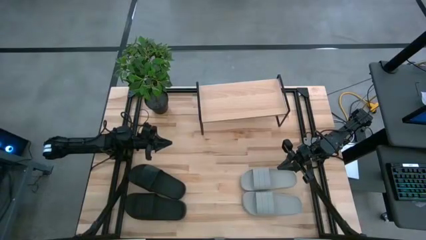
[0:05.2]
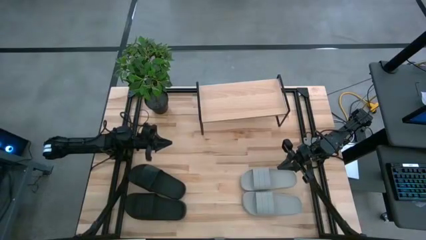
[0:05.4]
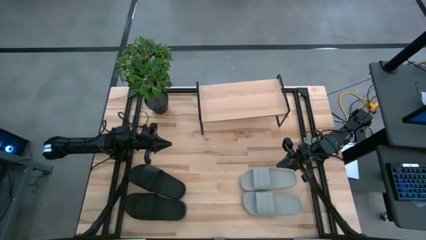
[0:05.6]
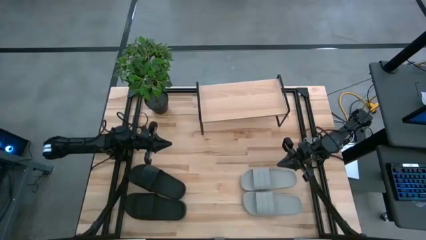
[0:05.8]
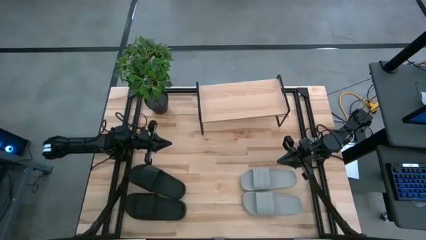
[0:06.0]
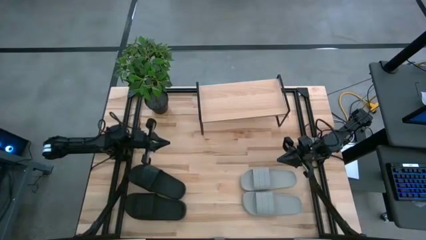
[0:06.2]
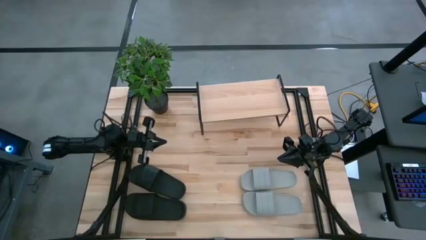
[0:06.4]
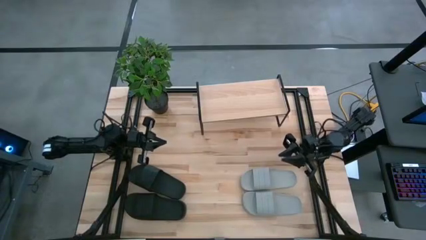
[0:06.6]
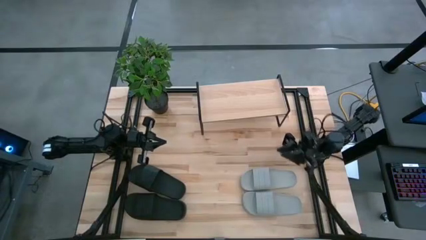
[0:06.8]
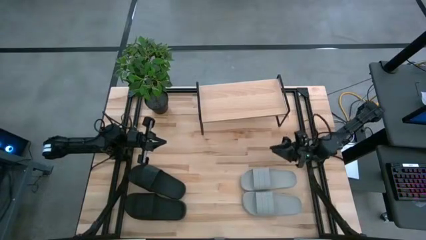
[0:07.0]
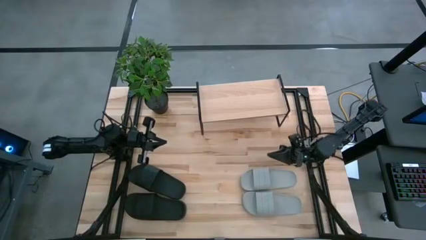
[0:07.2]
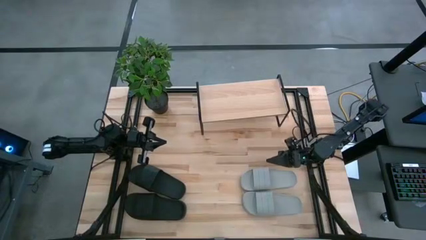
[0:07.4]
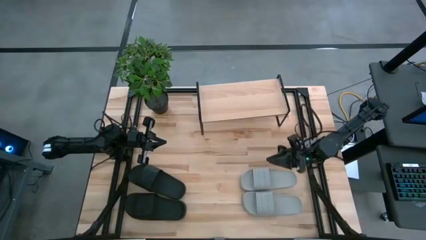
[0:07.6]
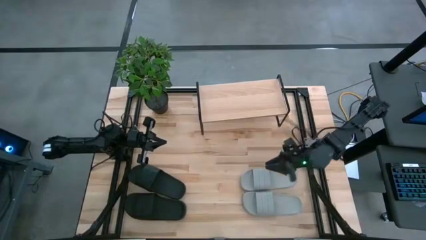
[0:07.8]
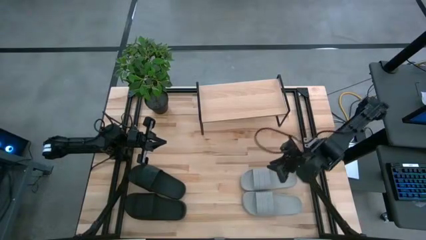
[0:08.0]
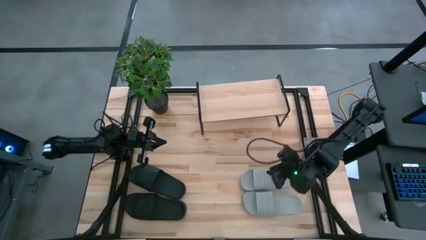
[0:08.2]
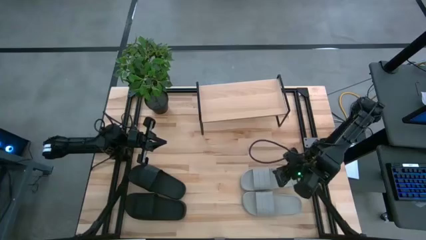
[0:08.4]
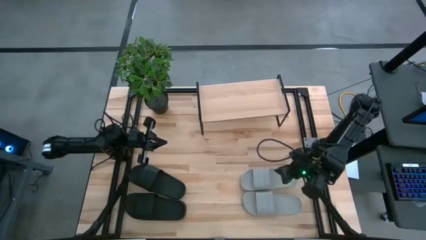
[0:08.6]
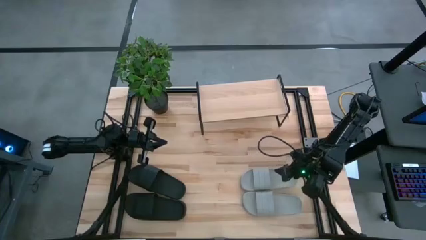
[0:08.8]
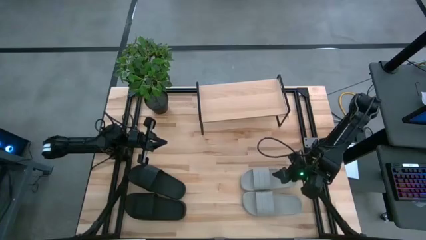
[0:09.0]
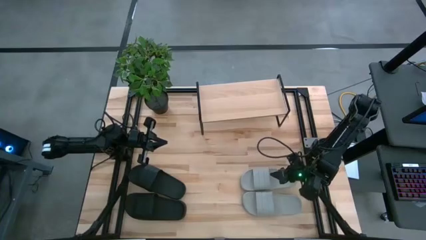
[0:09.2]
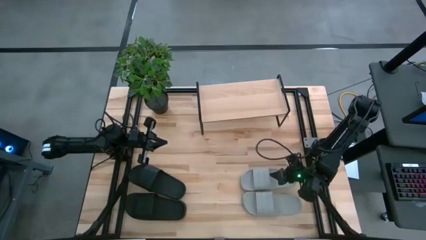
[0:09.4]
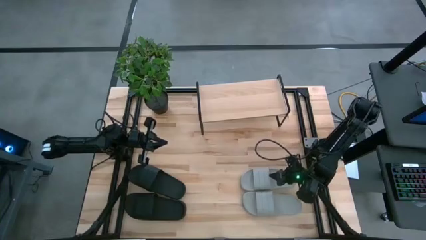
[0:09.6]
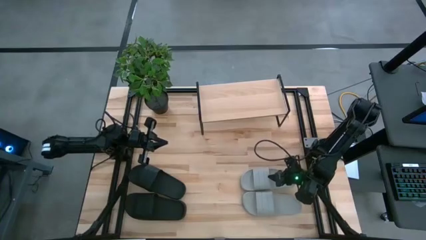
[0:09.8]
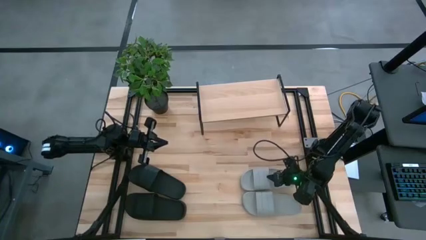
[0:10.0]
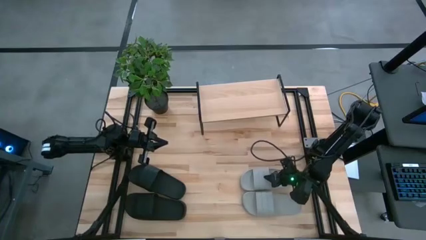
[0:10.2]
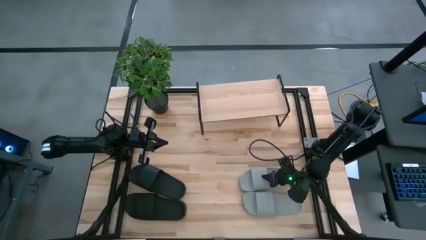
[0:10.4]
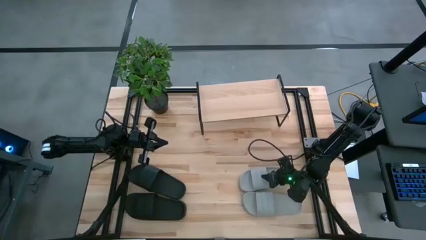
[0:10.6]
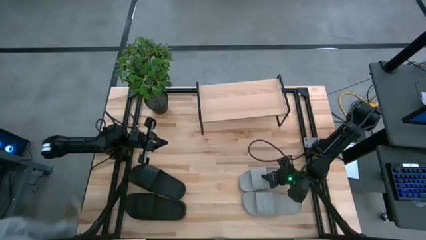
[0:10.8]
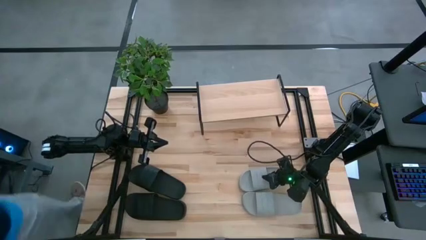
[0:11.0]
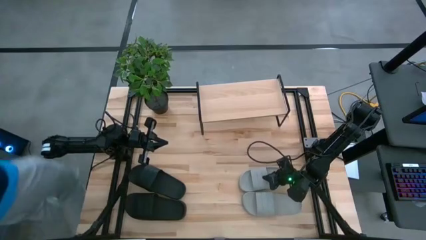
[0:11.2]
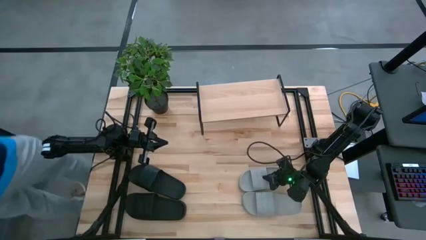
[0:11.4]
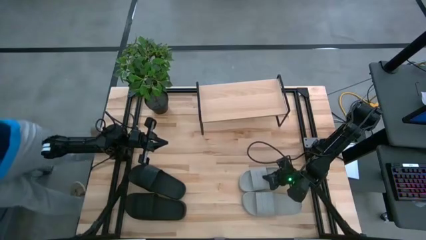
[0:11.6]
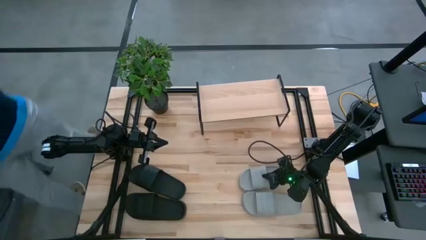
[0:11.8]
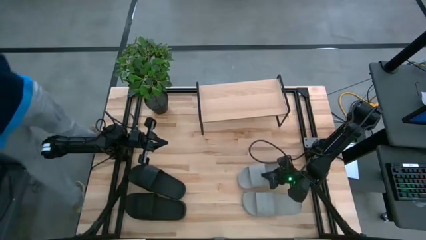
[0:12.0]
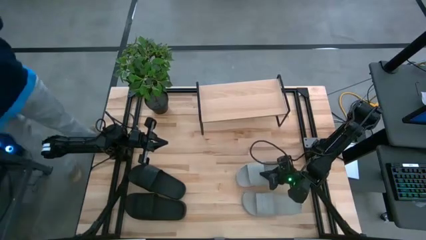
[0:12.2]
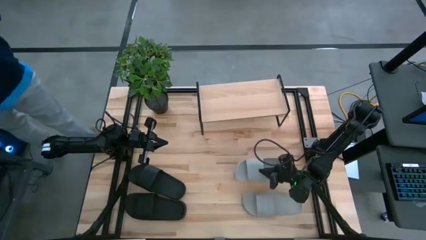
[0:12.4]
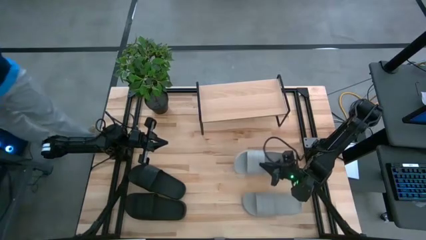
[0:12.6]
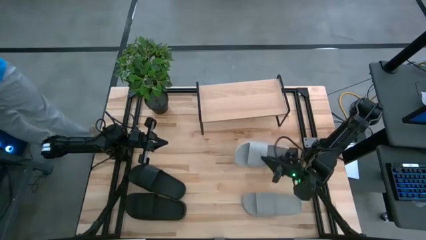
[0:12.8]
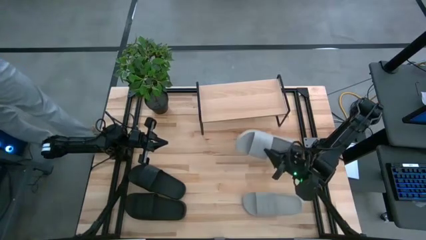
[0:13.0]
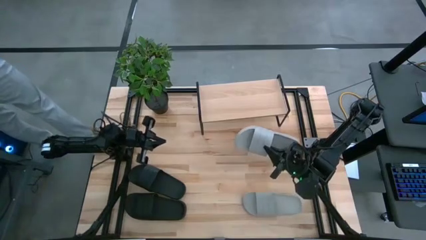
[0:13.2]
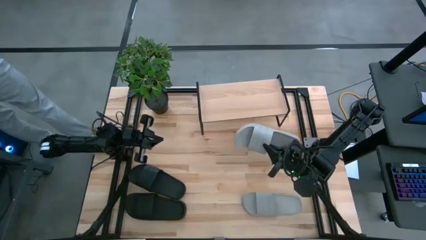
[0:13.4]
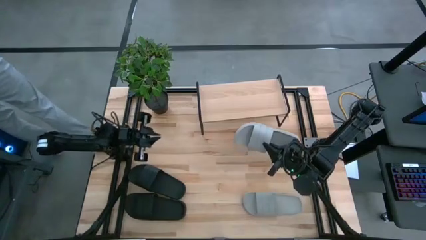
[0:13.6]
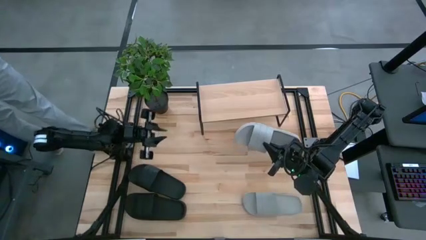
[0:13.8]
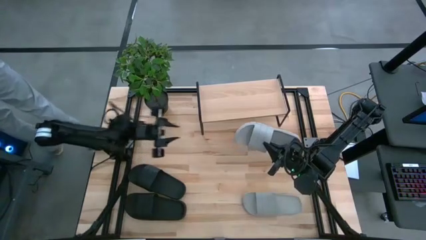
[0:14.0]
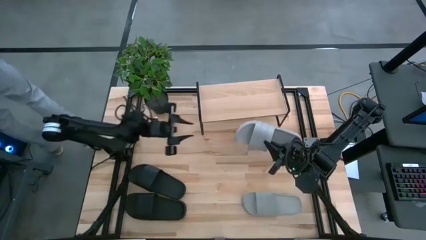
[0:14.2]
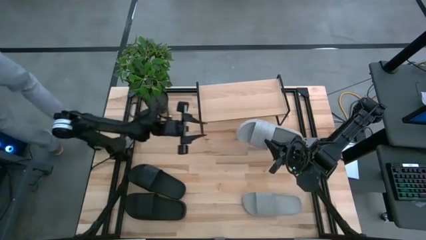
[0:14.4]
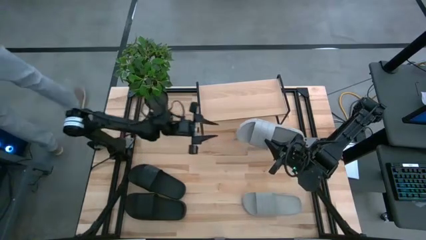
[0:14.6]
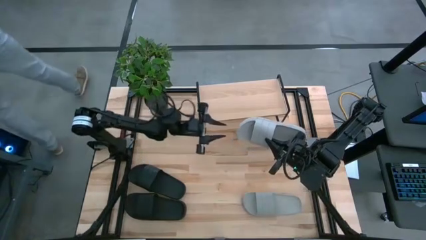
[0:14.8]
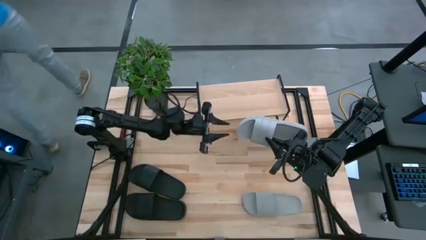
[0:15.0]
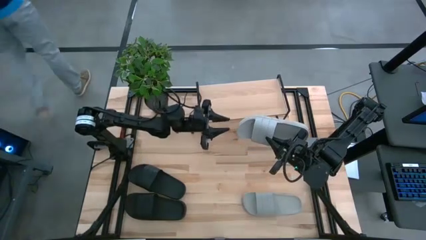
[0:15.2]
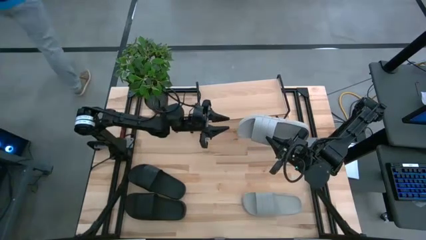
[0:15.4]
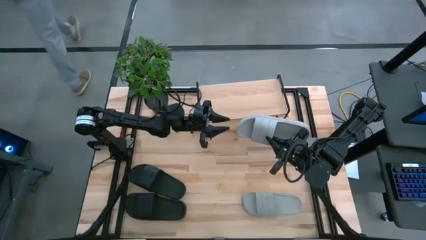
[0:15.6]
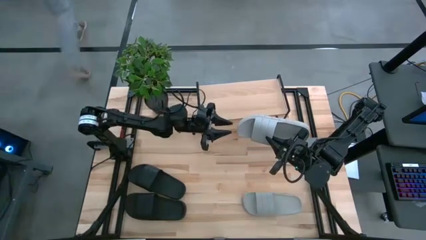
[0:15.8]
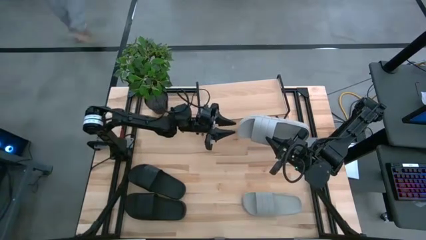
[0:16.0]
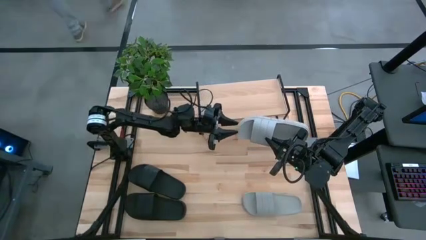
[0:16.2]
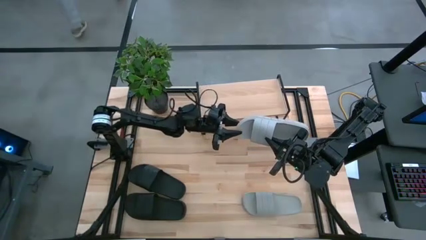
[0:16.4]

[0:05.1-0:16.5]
Task: Pick and place slides into the shelf
Put the top gray slide on the shelf

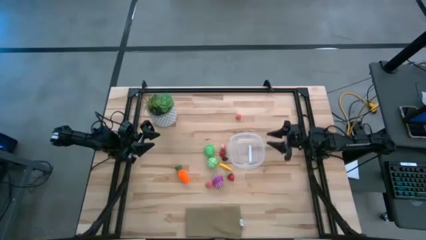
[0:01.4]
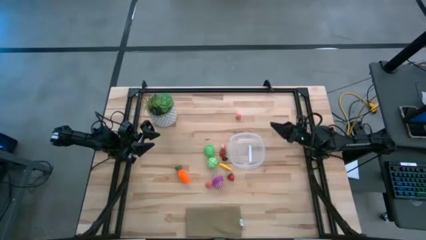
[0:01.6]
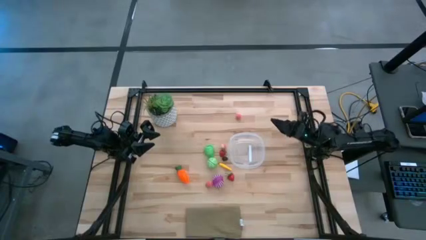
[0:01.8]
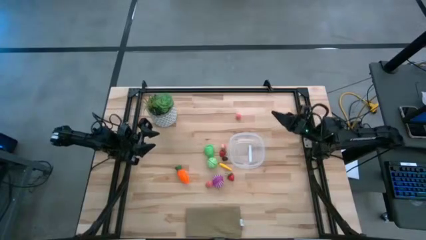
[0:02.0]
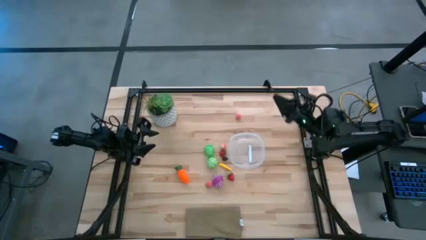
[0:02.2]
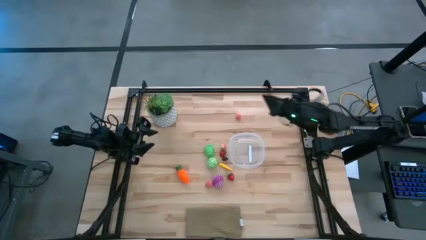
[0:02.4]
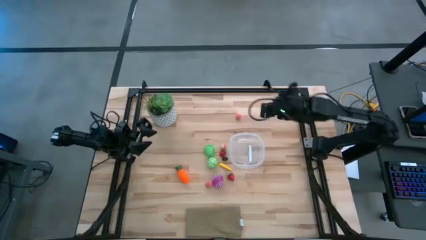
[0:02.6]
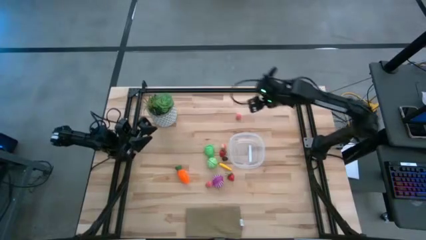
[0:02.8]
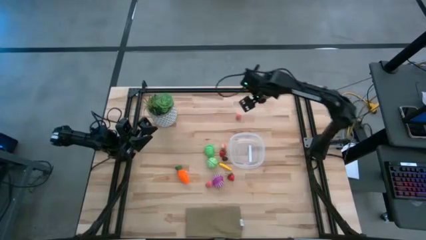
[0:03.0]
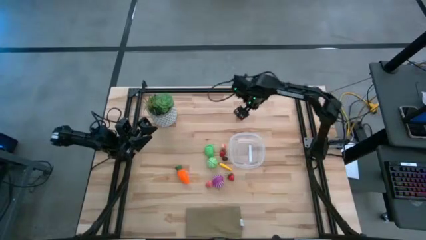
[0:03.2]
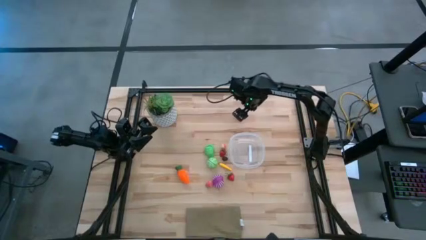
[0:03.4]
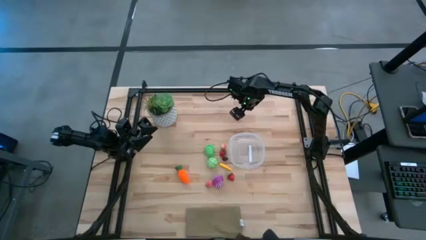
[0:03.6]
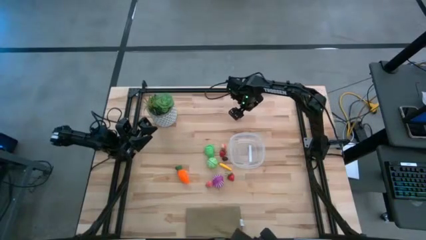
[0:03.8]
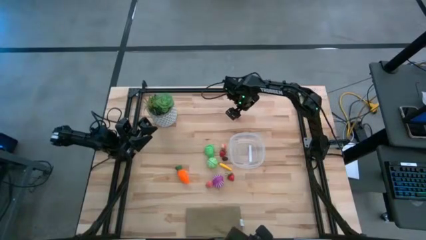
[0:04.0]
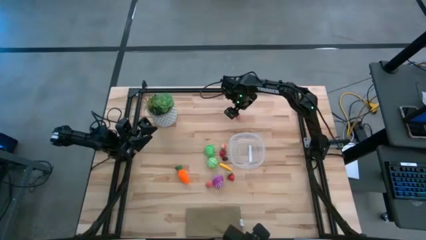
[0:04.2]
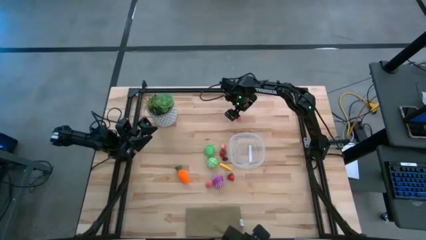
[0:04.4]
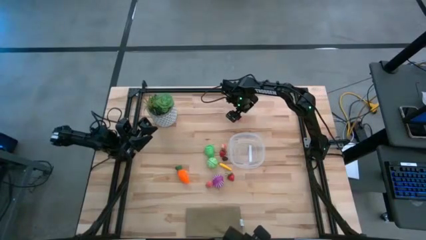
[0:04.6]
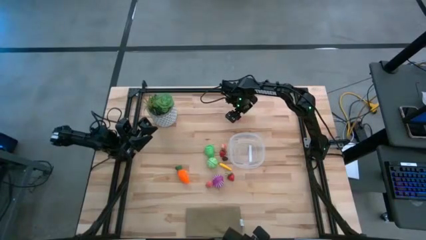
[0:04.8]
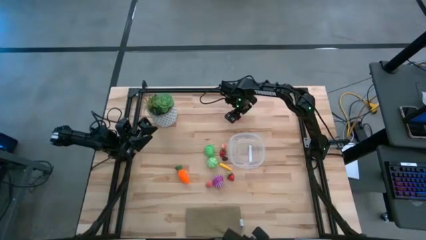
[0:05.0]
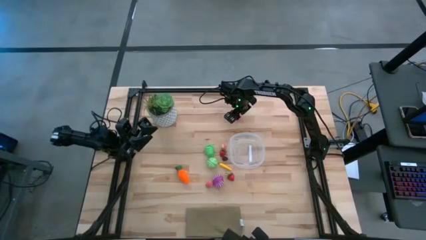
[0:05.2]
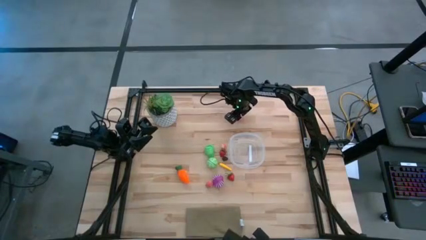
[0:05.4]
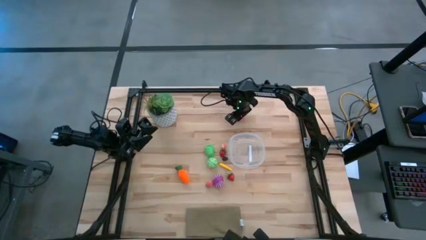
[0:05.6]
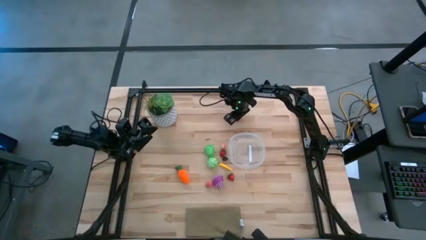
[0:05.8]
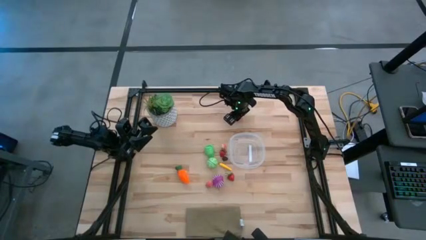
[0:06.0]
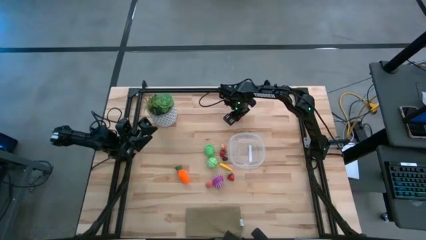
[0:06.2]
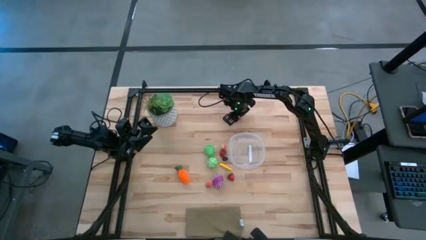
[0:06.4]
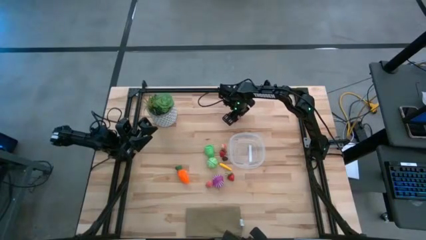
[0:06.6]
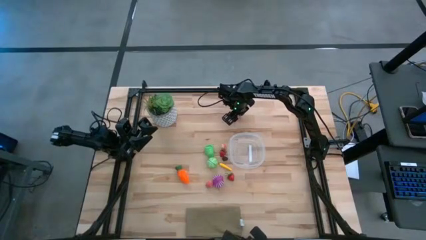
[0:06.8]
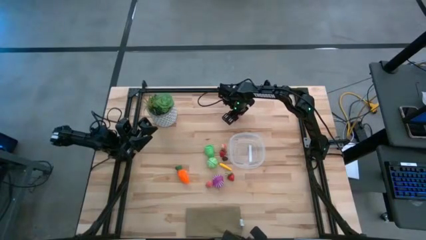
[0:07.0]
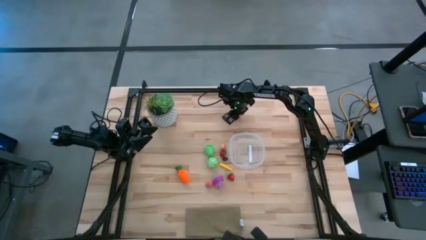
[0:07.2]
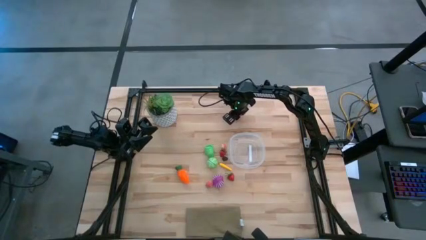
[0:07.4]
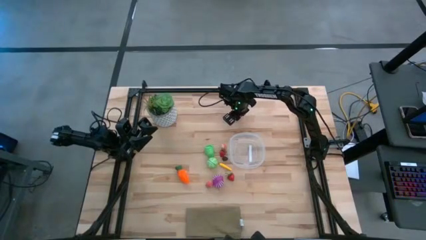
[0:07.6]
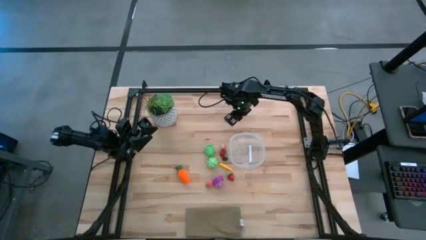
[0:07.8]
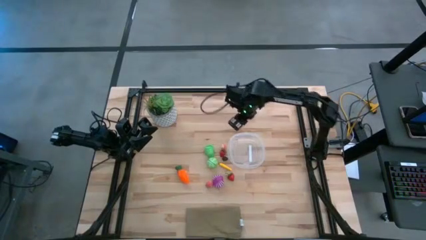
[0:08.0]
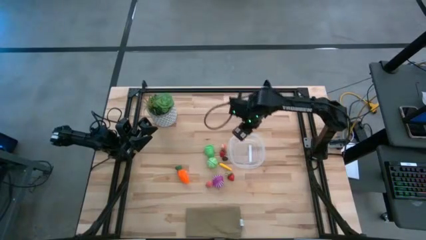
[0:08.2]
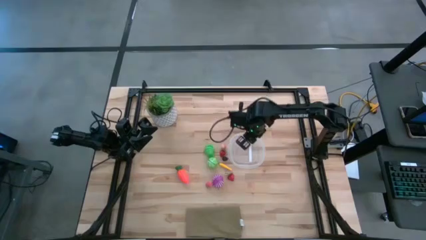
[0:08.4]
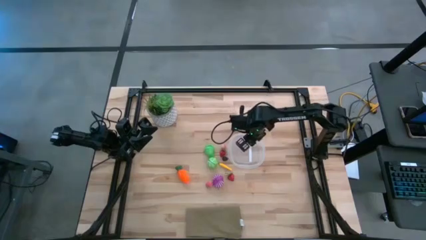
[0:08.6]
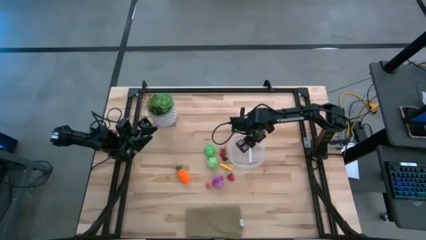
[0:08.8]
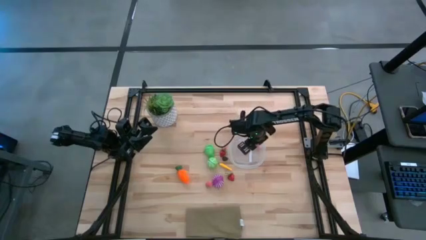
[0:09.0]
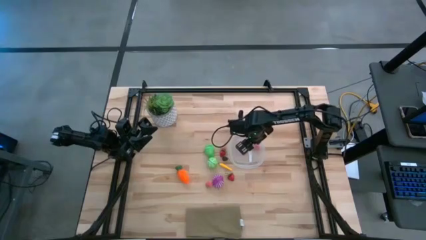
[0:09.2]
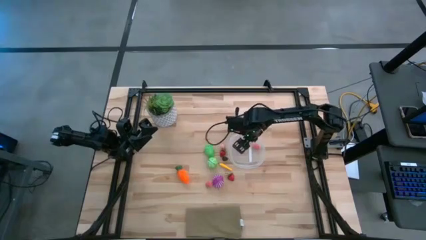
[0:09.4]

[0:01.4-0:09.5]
Task: Pick and placing Produce into tupperware
Put the top pink peach into the transparent container
